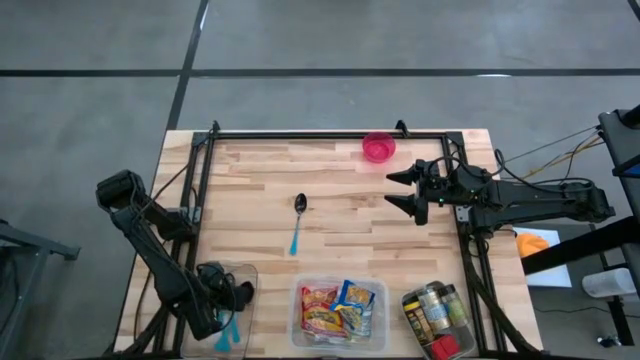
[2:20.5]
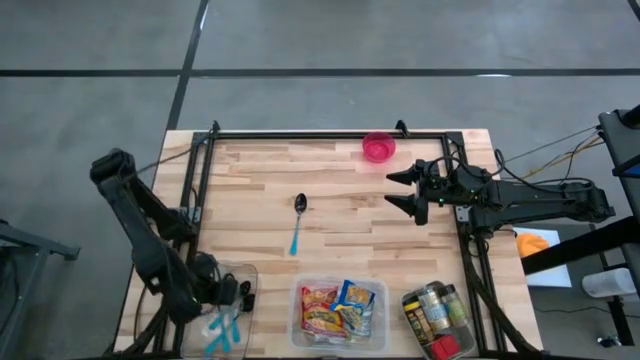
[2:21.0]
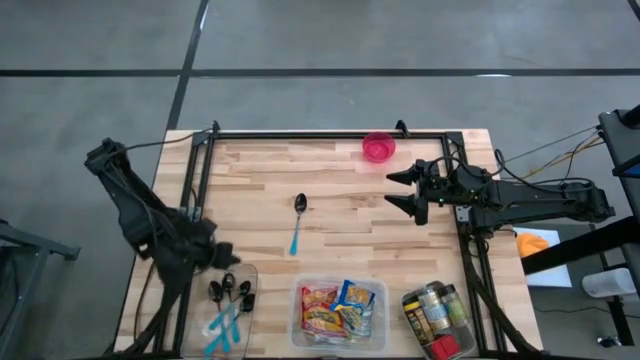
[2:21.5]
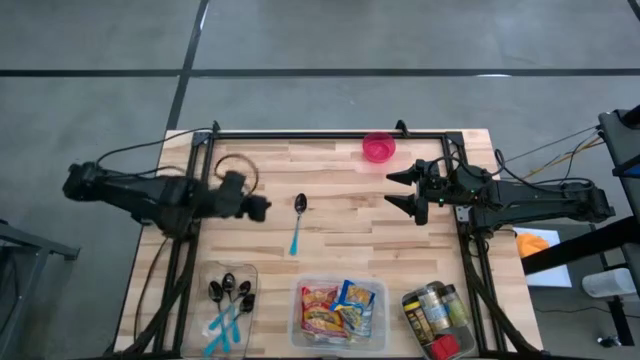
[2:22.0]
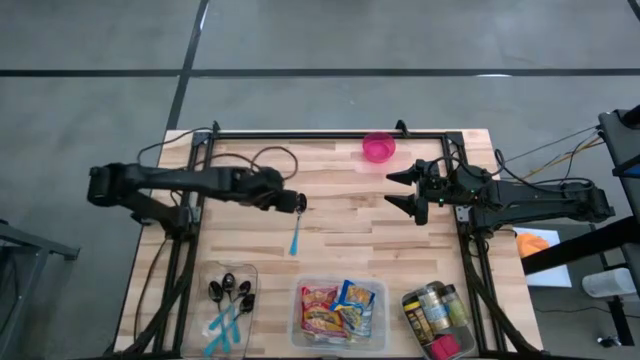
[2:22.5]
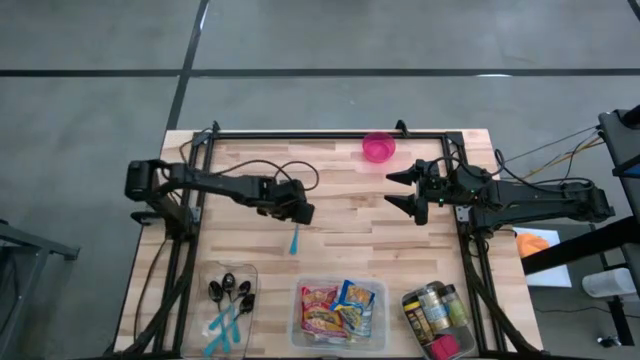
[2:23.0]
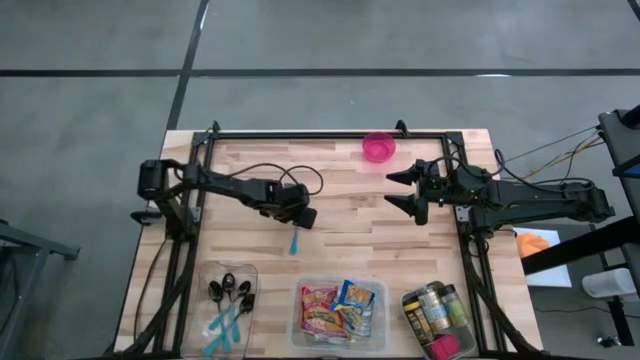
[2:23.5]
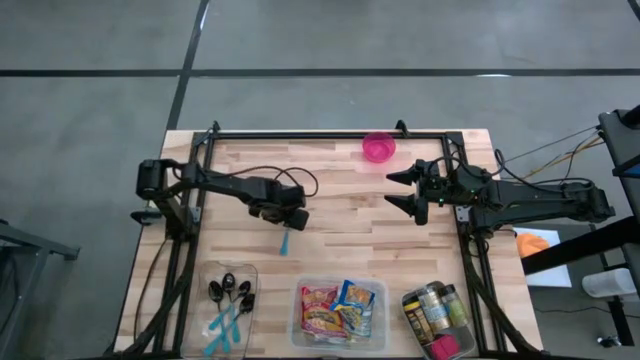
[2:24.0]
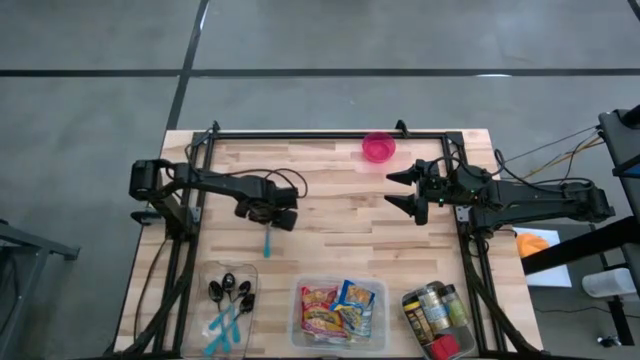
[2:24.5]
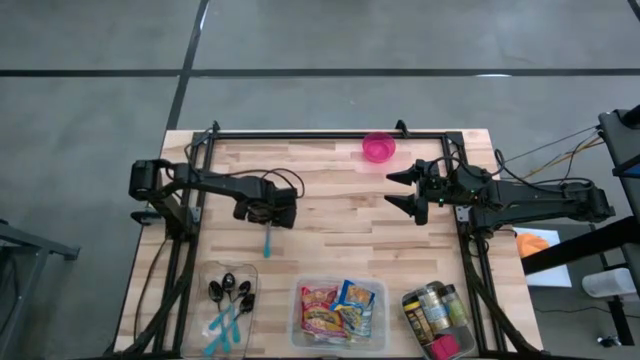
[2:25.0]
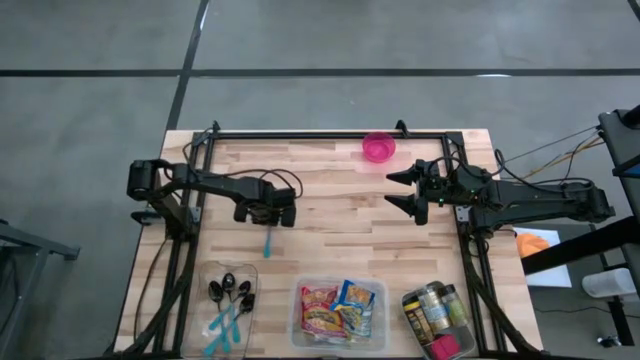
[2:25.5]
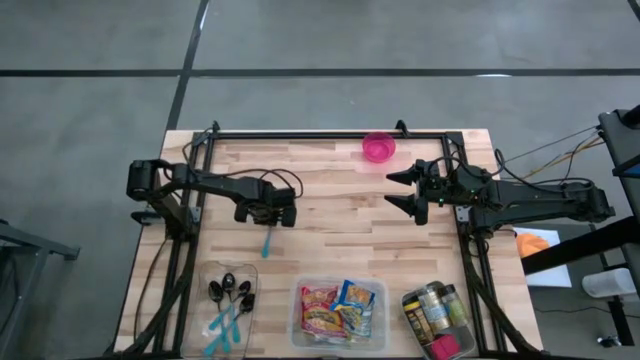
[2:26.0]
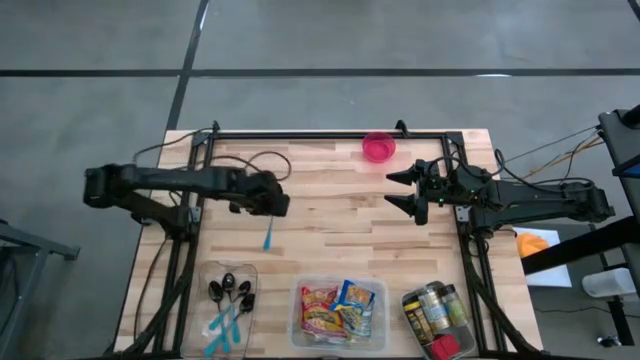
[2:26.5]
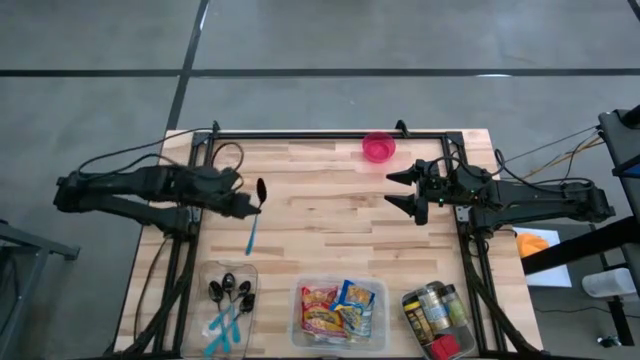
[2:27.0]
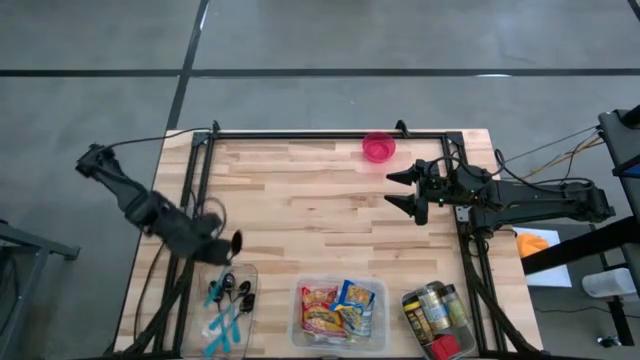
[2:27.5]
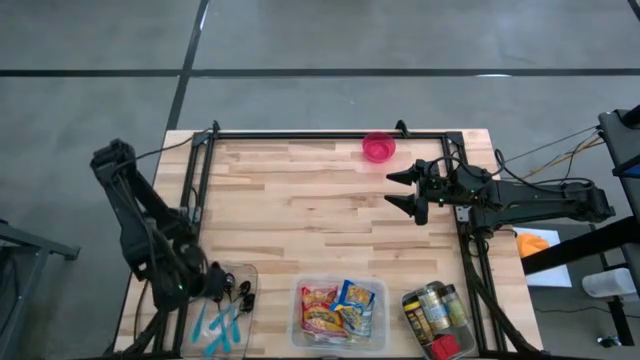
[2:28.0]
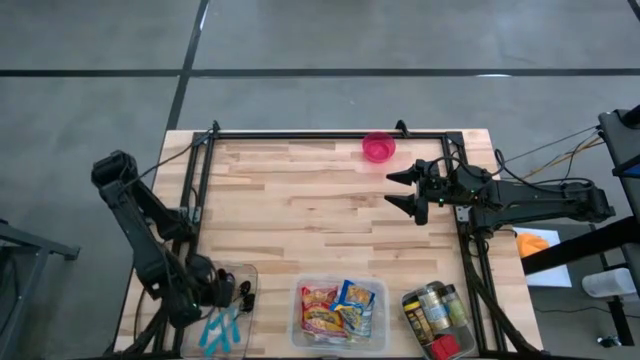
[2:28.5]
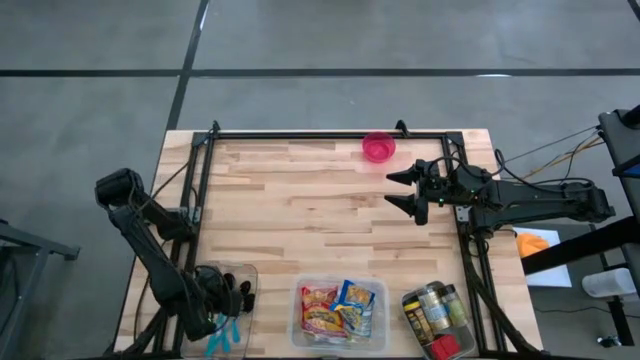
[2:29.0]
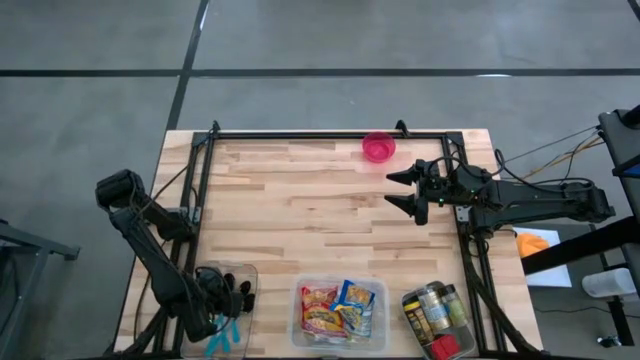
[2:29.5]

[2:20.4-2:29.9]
Put the blue spoon into the transparent bin

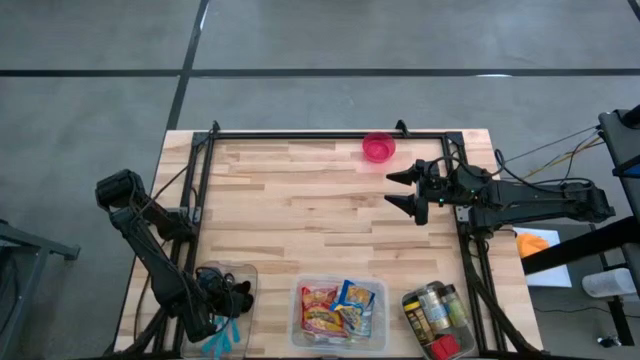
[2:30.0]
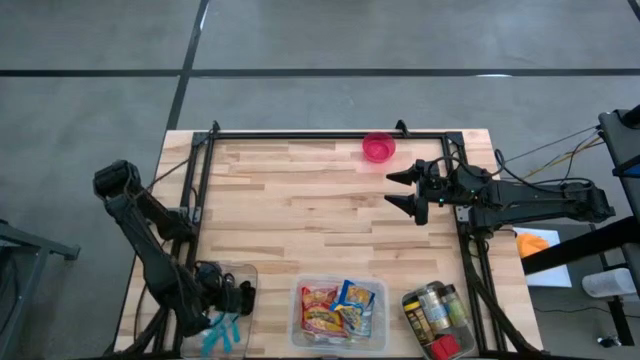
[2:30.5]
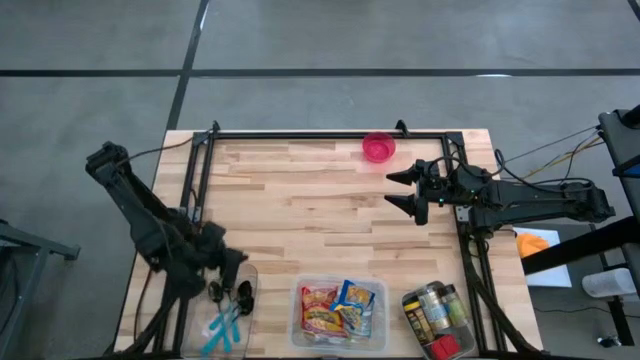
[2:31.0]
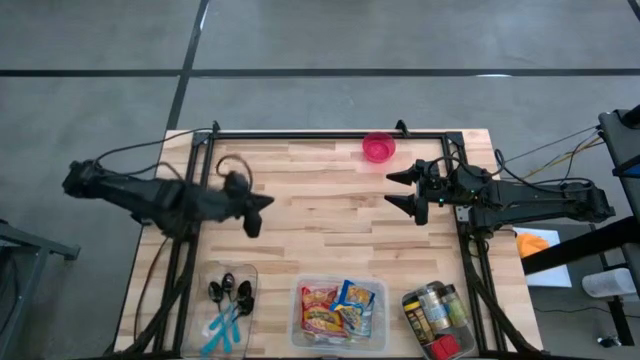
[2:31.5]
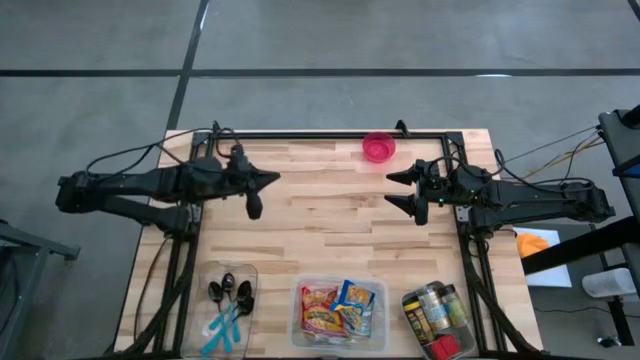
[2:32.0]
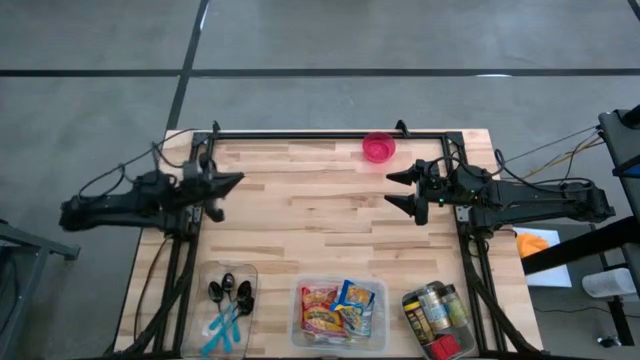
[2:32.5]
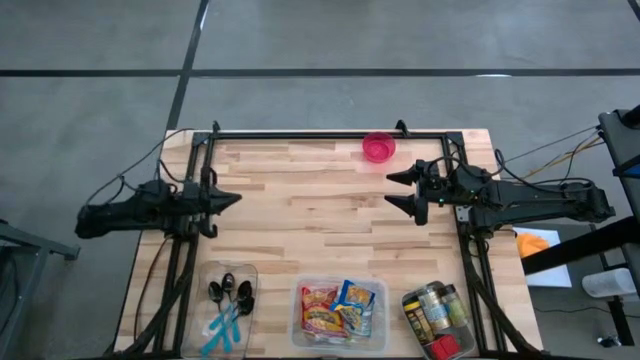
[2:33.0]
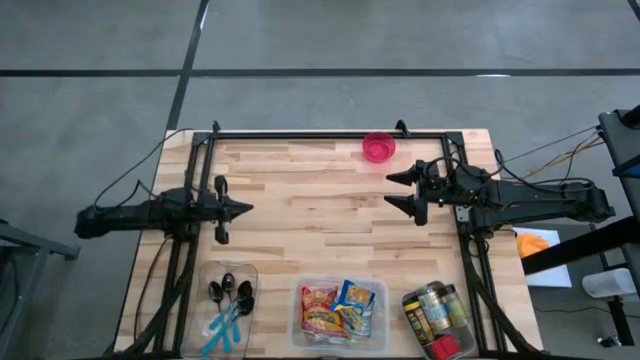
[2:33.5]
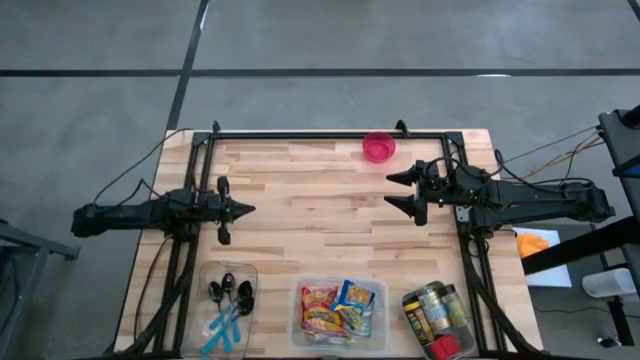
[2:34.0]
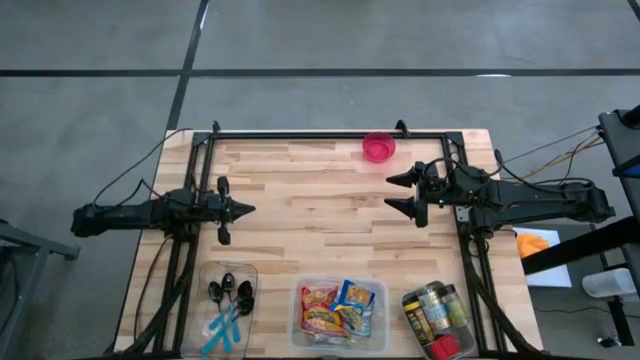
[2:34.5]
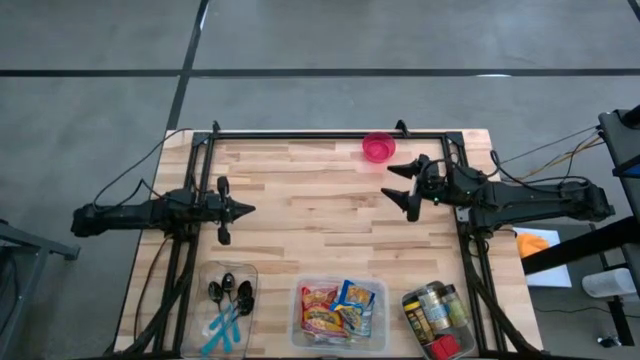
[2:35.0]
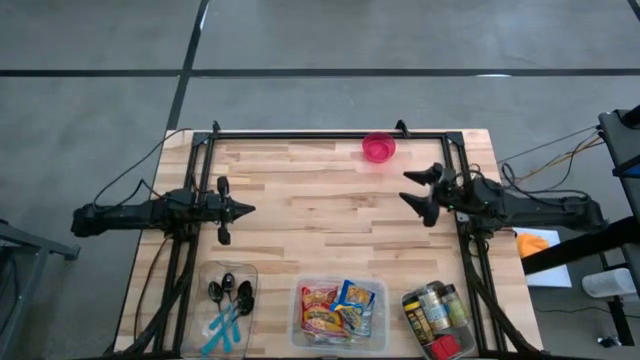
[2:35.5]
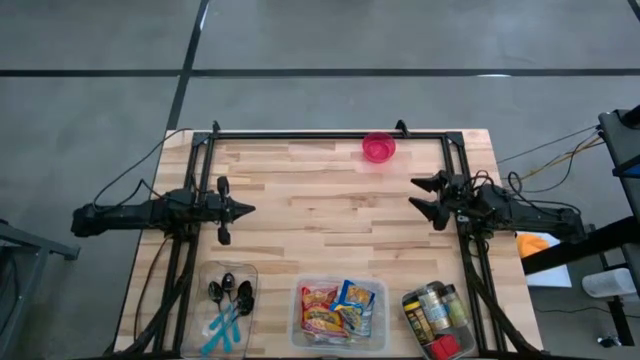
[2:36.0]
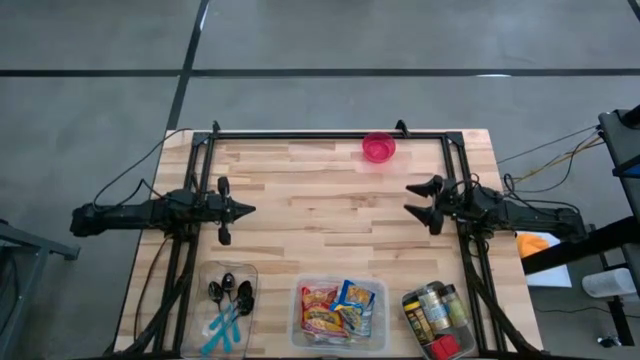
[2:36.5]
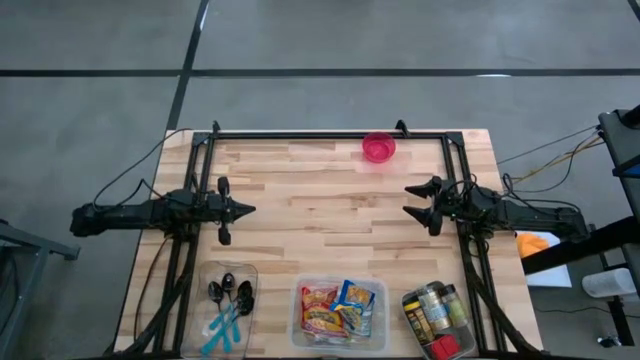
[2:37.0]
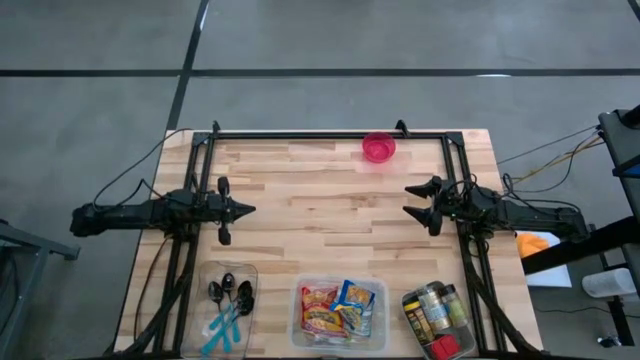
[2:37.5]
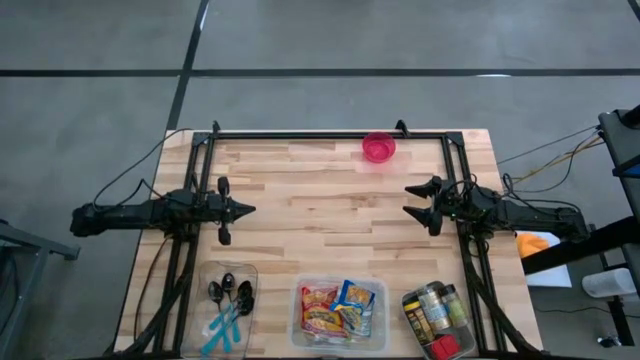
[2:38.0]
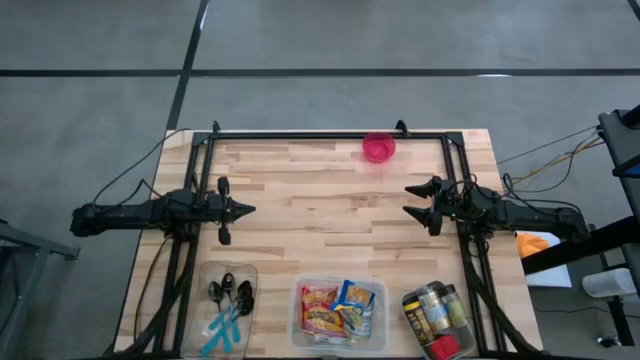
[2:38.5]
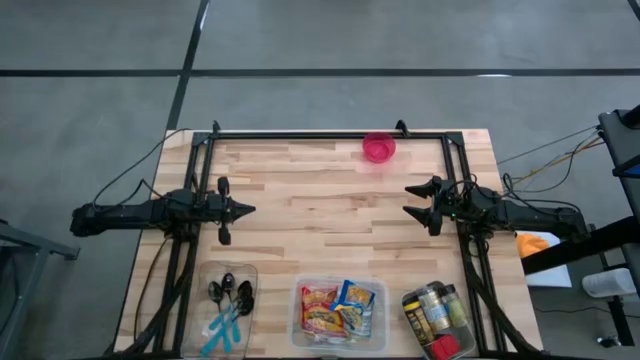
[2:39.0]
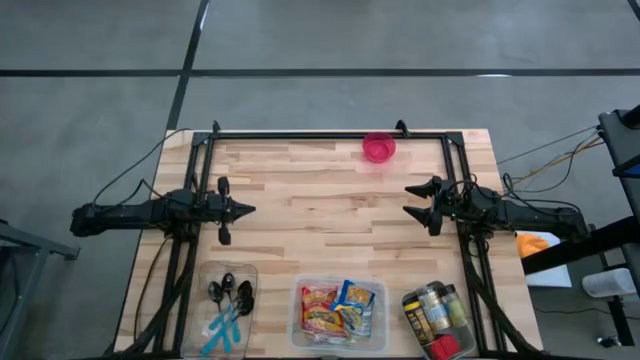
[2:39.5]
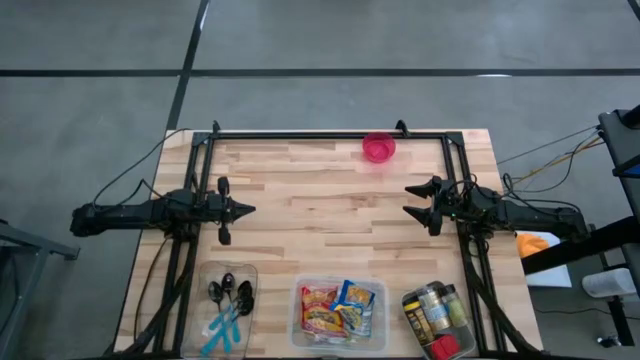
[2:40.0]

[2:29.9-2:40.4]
Return to Home Position
